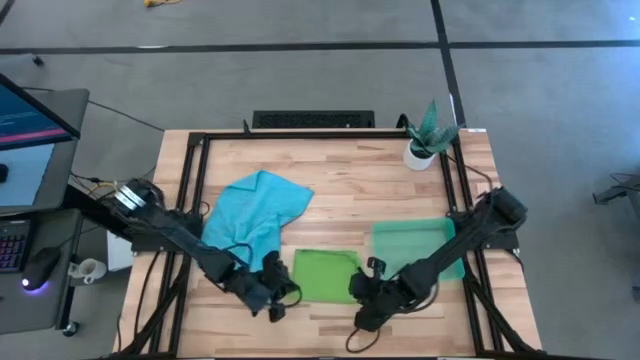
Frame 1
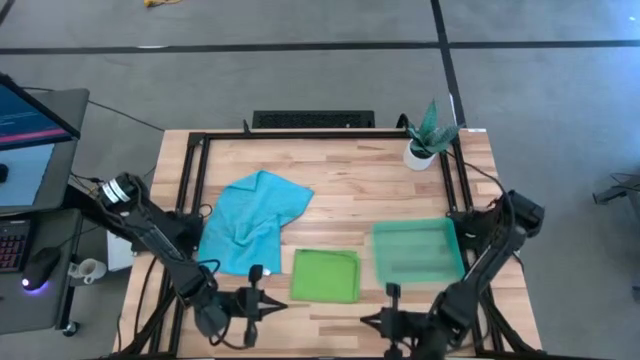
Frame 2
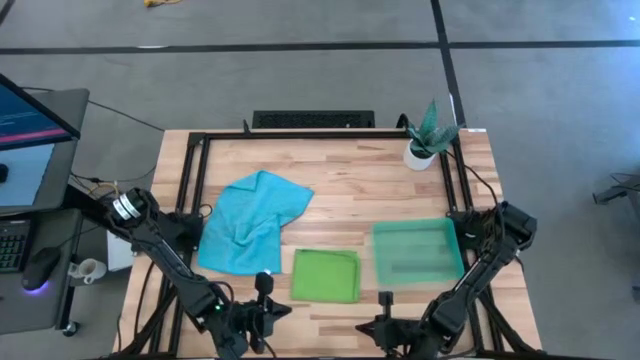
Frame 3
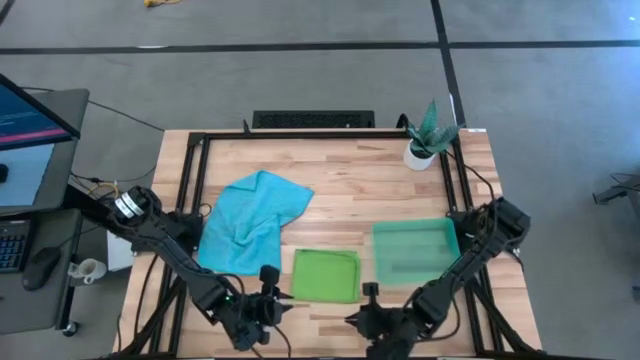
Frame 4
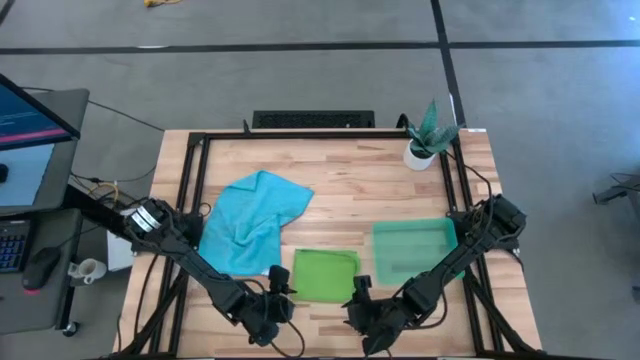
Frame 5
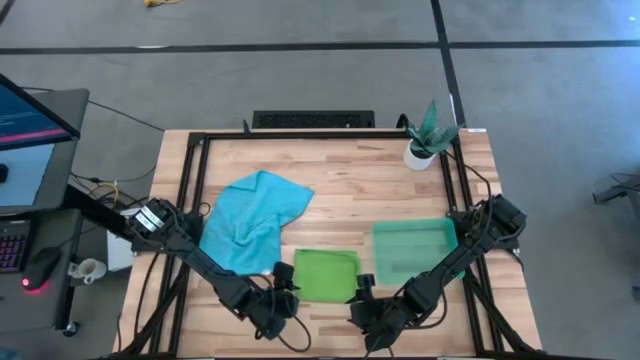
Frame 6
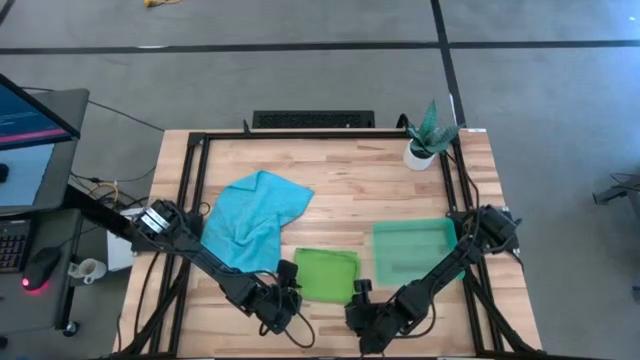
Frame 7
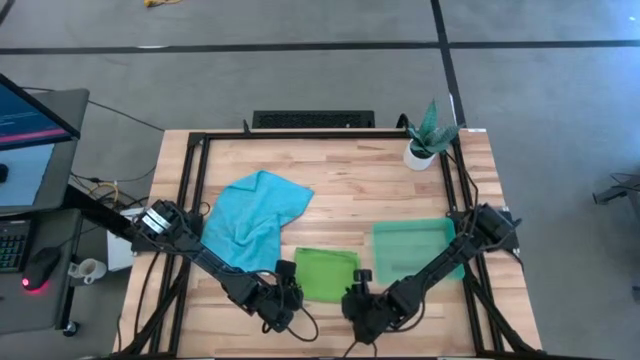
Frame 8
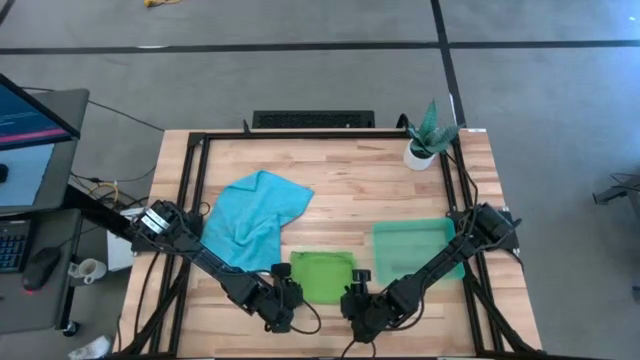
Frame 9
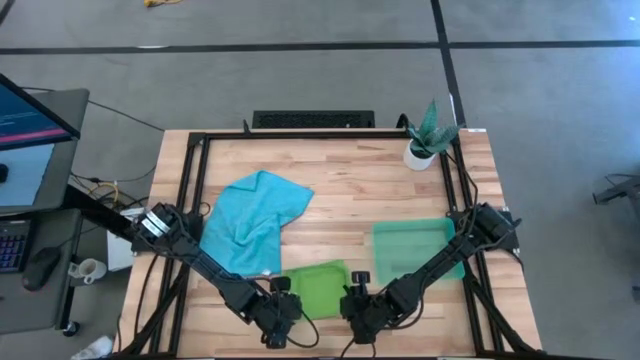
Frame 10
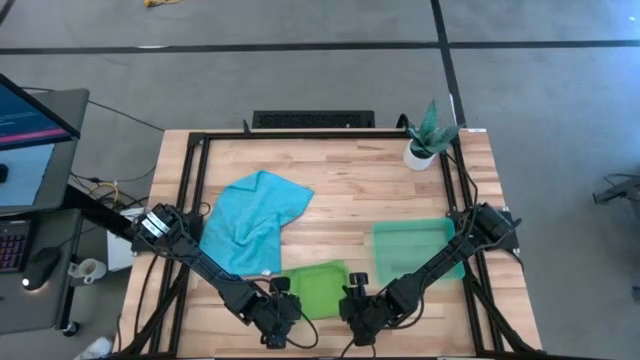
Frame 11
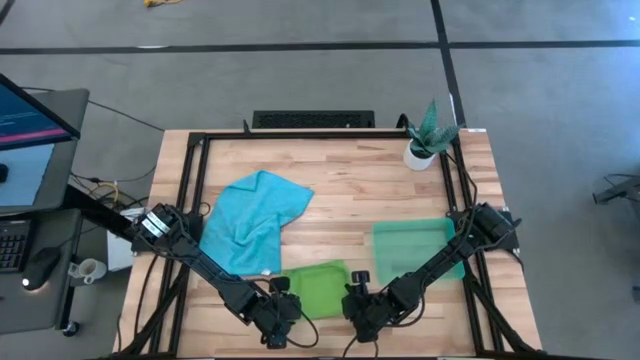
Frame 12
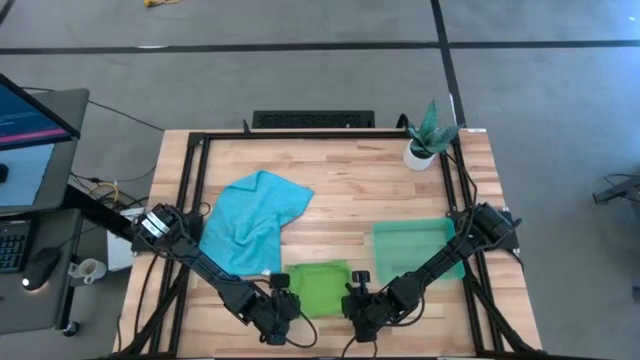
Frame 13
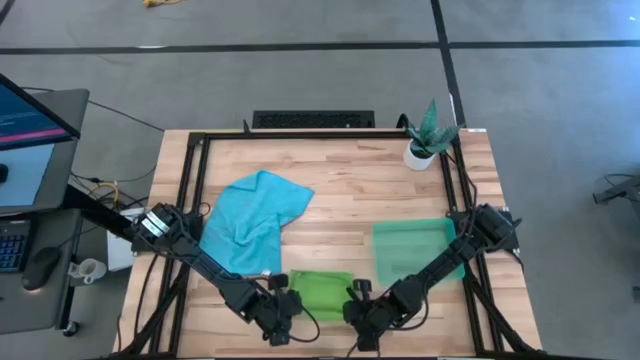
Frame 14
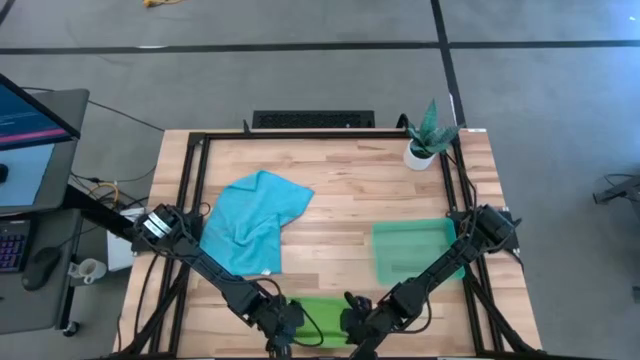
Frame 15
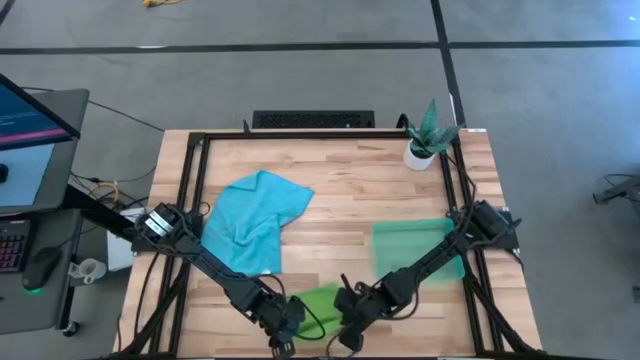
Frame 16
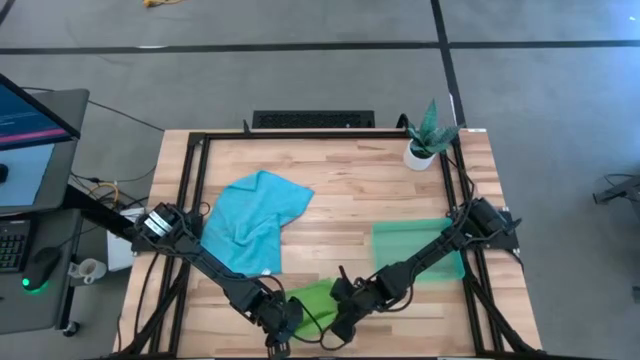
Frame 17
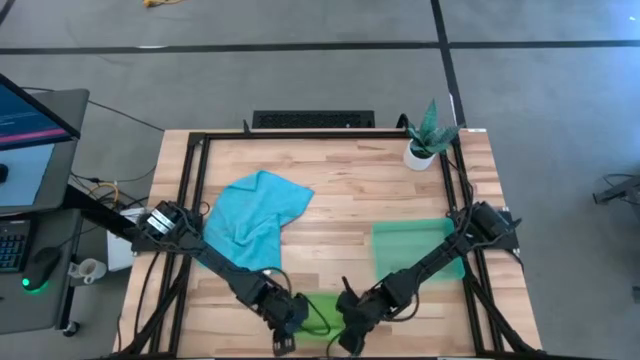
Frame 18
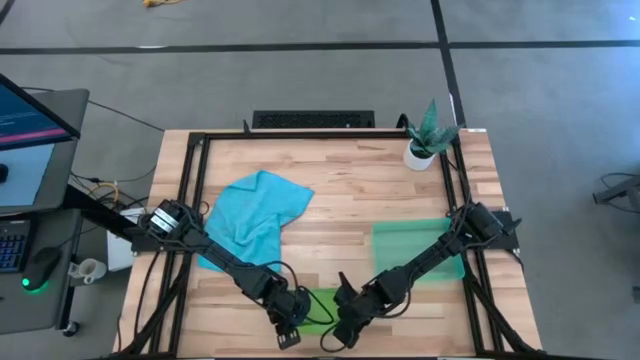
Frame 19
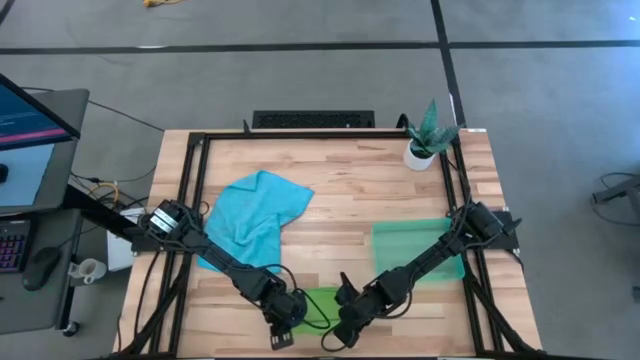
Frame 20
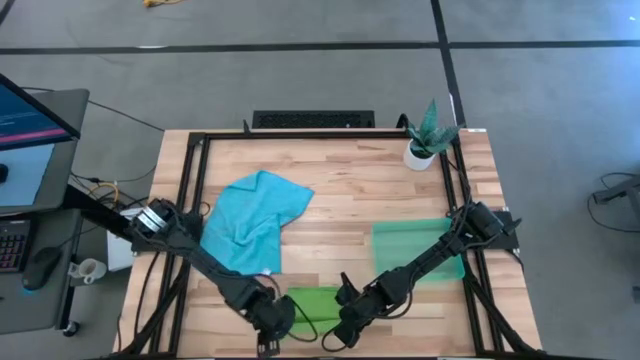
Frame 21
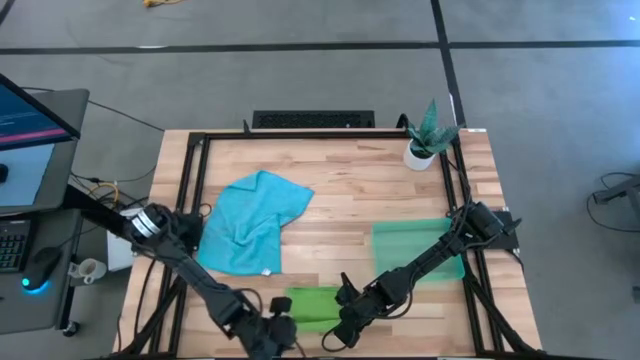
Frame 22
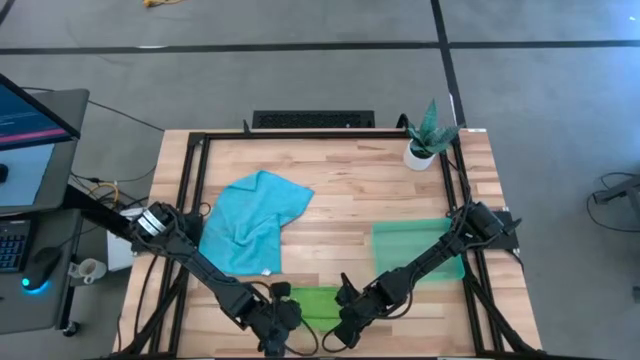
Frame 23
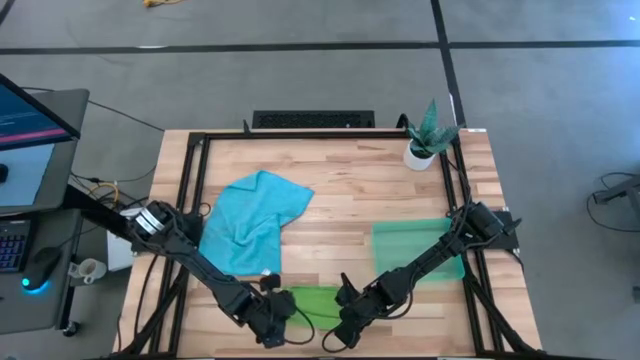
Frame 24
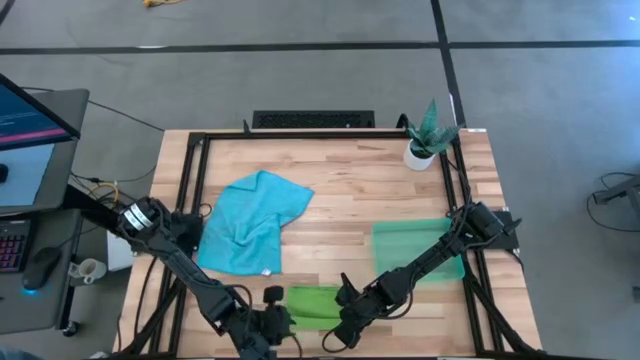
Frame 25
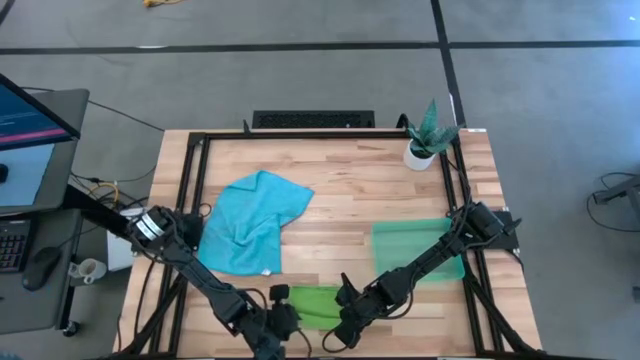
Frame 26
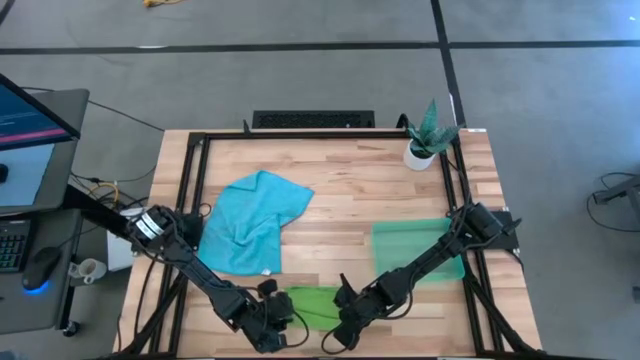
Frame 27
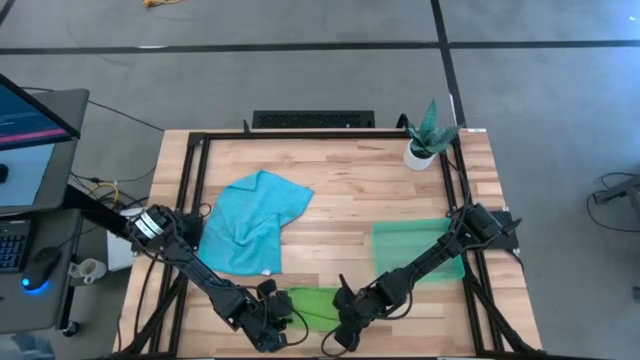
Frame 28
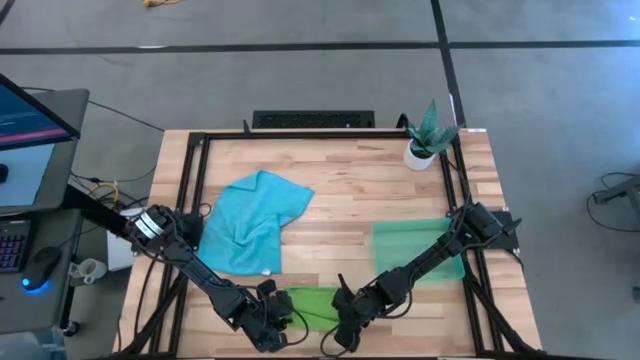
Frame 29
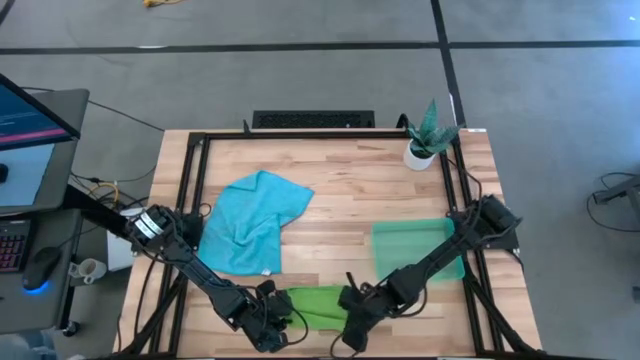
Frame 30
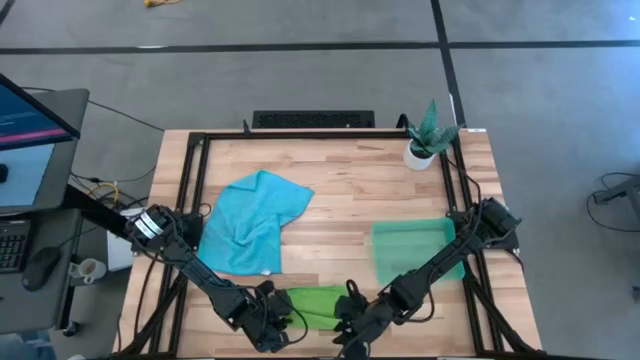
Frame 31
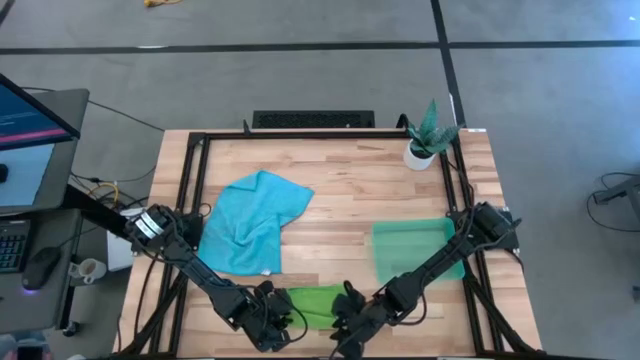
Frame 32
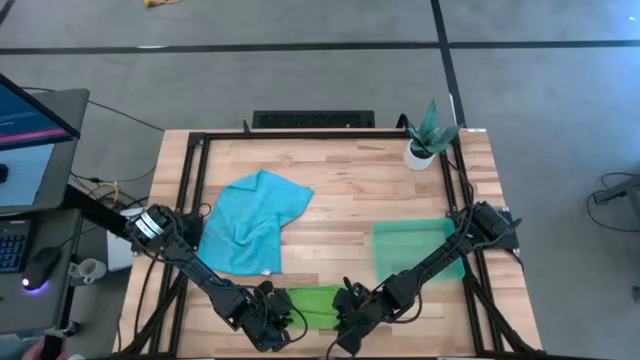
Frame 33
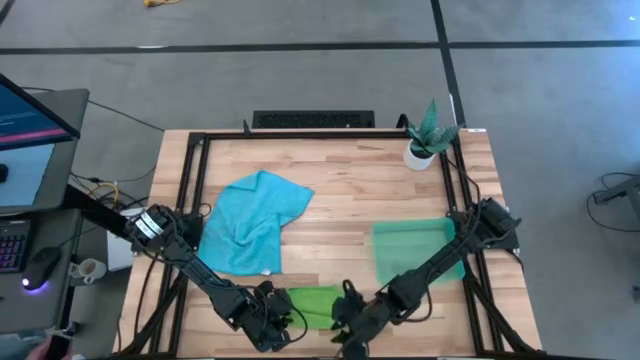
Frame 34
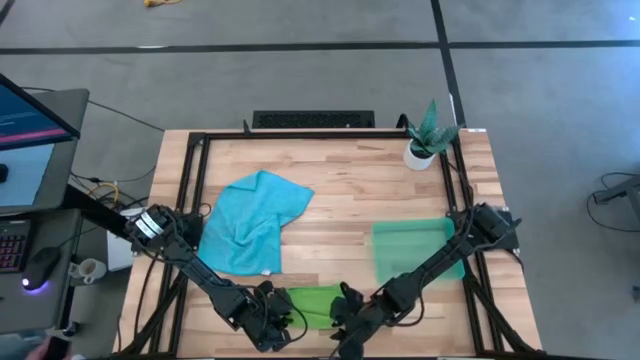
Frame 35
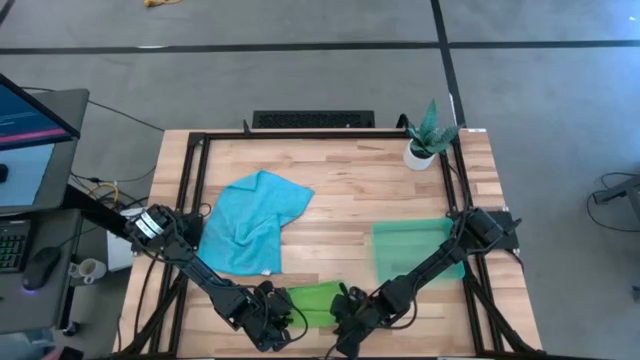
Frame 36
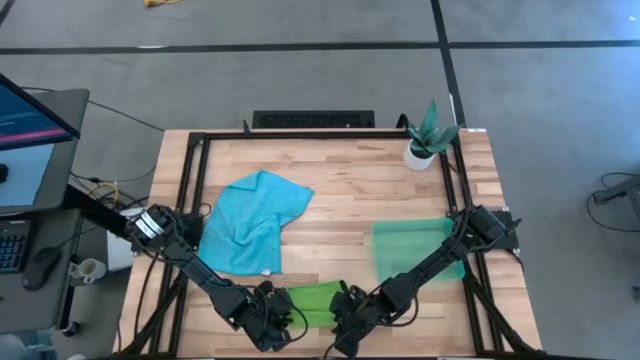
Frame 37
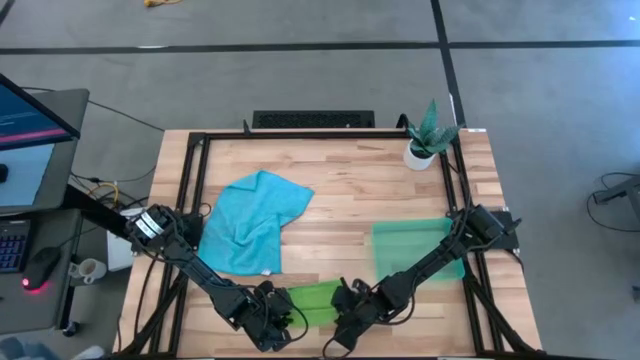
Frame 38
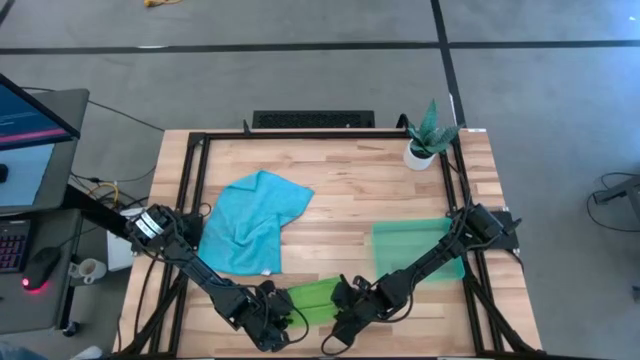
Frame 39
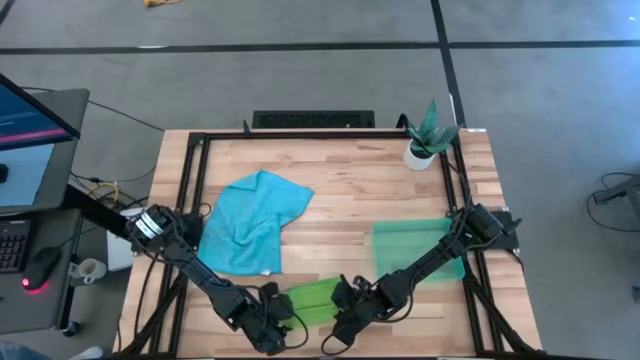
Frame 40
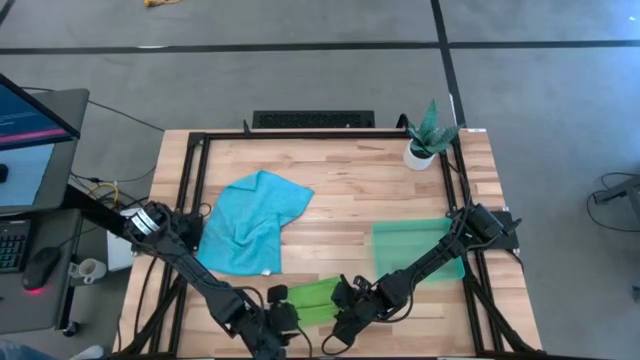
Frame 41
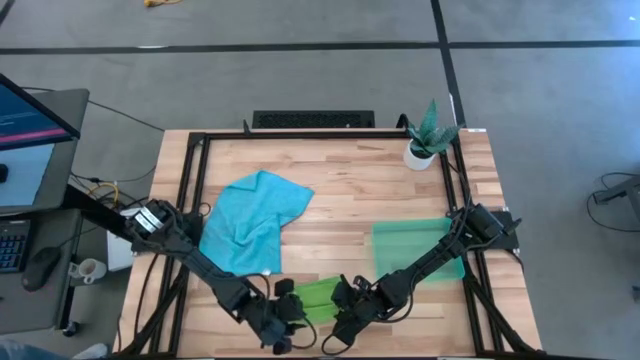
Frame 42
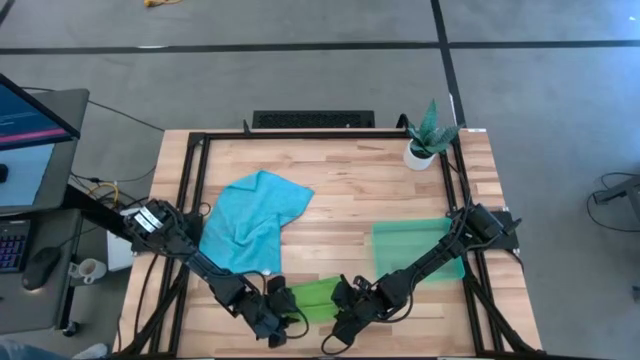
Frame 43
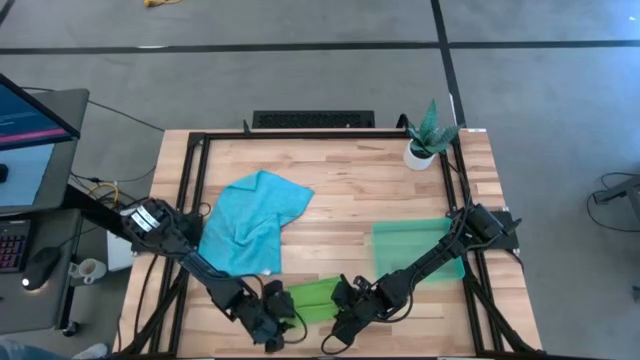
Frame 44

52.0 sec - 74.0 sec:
Task: Roll microfiber towels into tight, uniform cylinder then place into a basket
Roll the green towel
